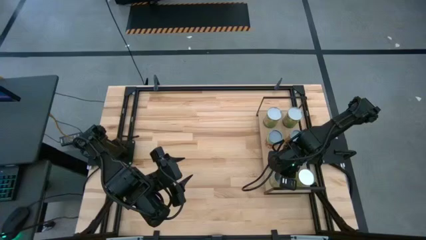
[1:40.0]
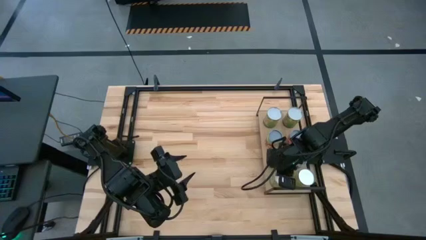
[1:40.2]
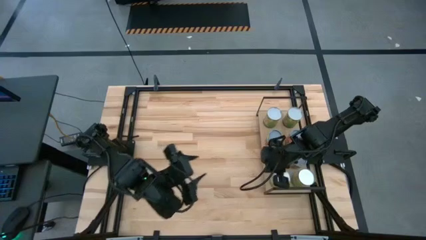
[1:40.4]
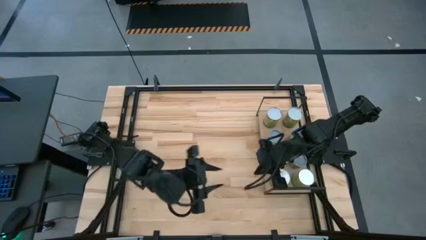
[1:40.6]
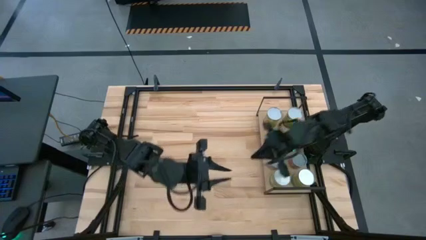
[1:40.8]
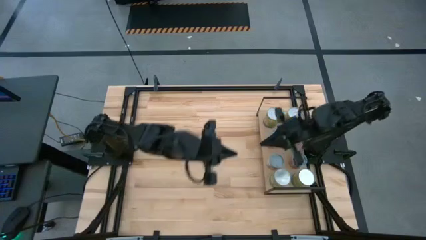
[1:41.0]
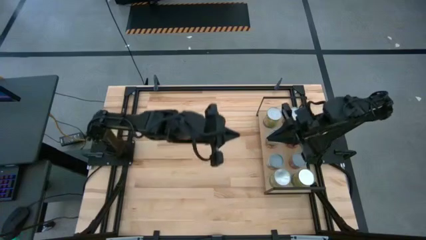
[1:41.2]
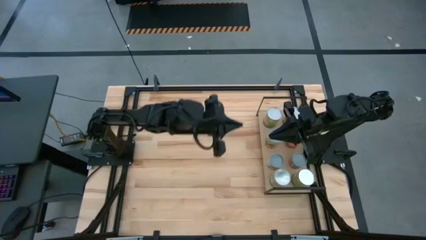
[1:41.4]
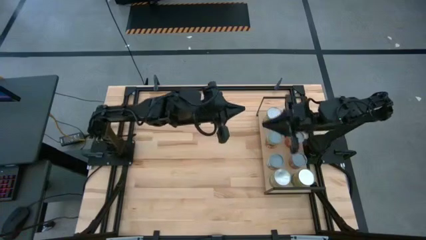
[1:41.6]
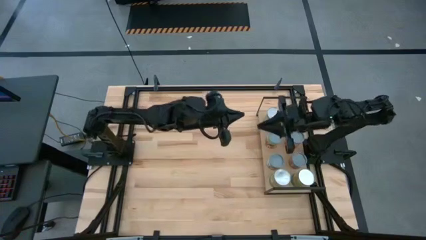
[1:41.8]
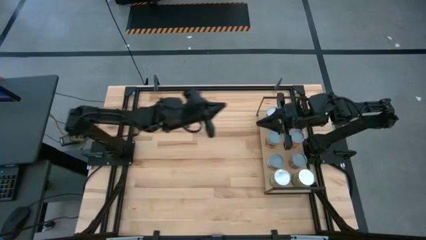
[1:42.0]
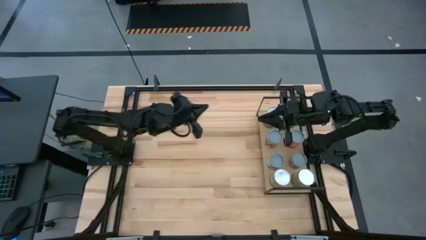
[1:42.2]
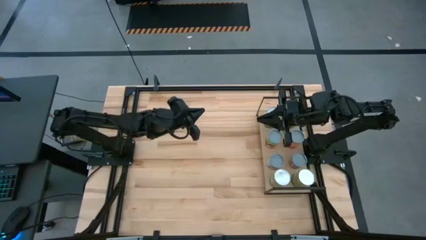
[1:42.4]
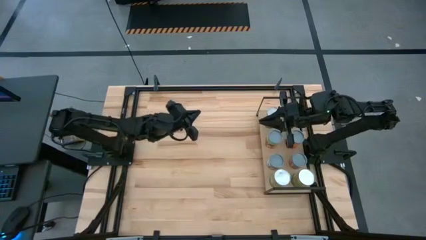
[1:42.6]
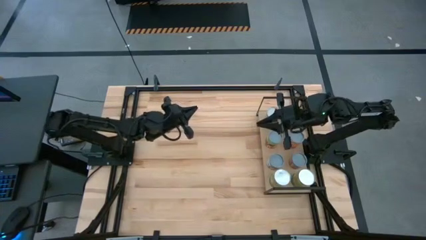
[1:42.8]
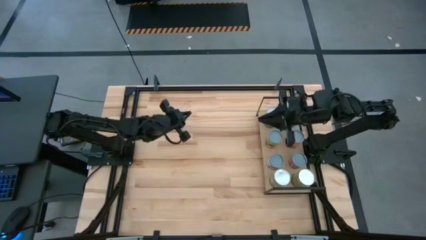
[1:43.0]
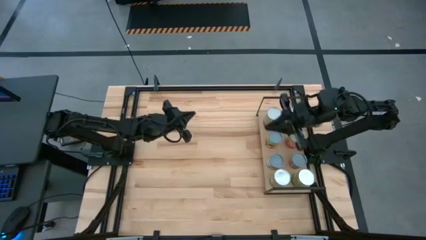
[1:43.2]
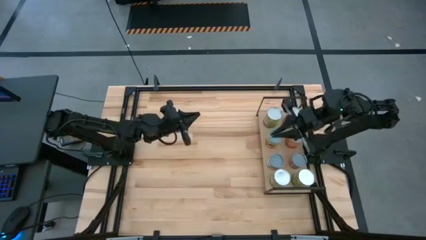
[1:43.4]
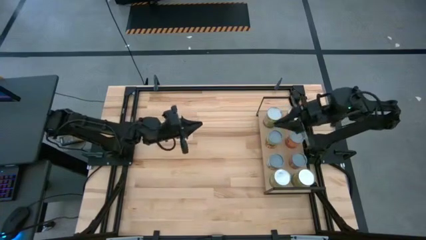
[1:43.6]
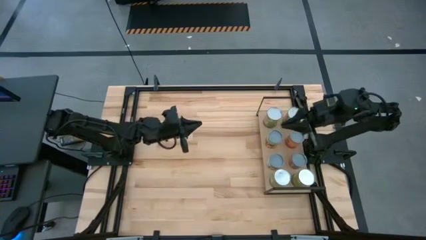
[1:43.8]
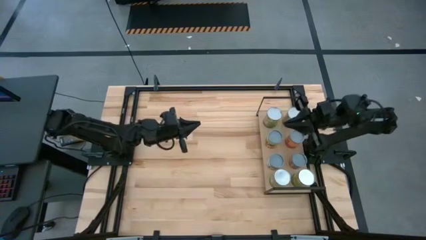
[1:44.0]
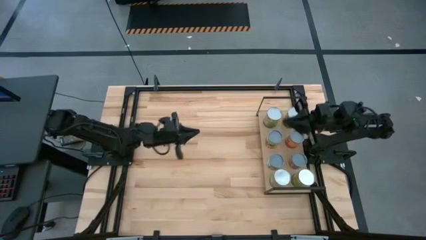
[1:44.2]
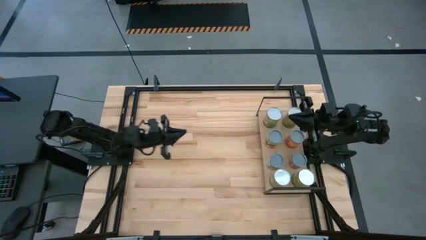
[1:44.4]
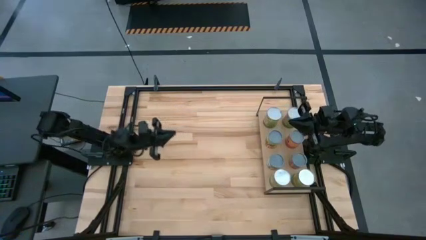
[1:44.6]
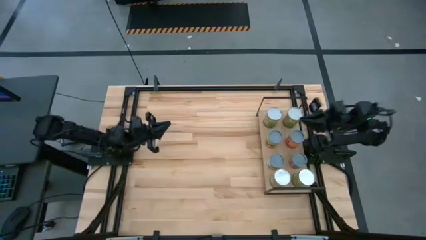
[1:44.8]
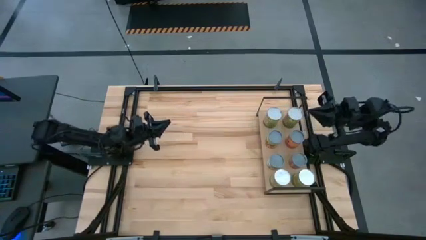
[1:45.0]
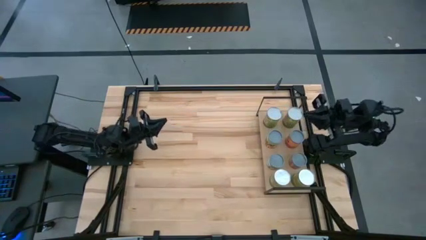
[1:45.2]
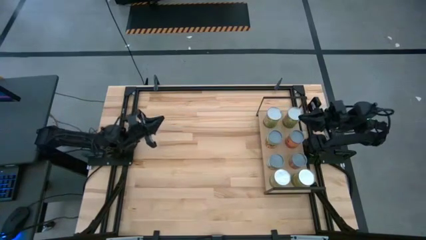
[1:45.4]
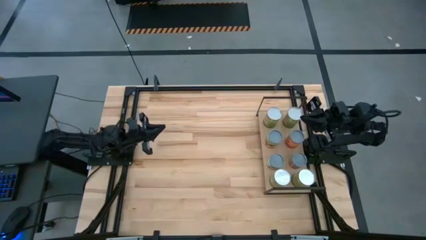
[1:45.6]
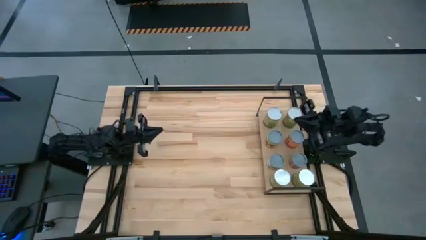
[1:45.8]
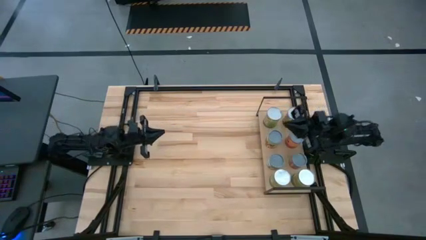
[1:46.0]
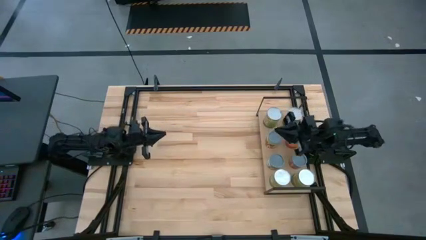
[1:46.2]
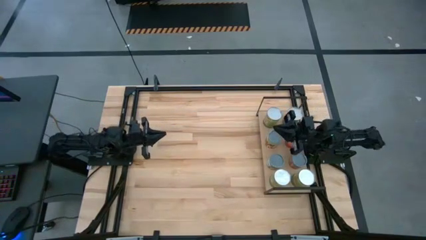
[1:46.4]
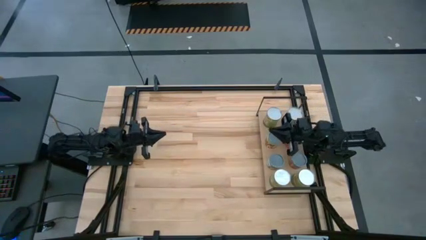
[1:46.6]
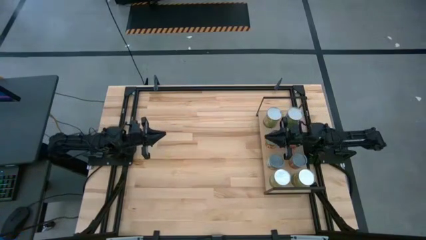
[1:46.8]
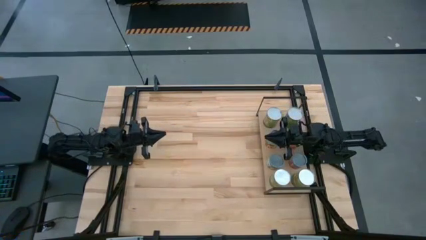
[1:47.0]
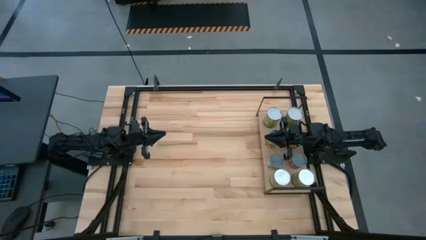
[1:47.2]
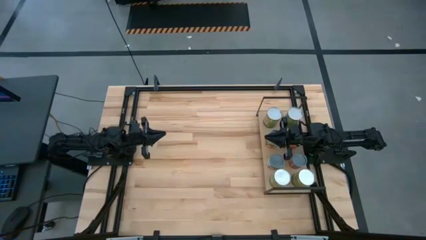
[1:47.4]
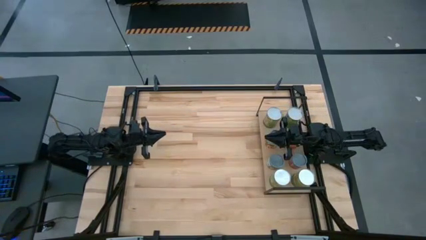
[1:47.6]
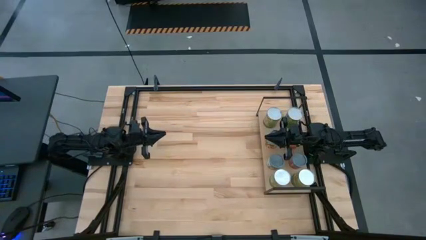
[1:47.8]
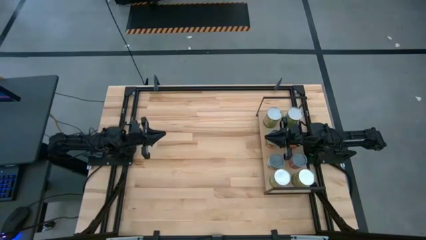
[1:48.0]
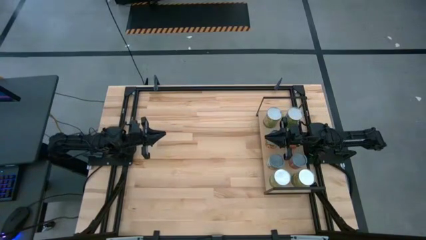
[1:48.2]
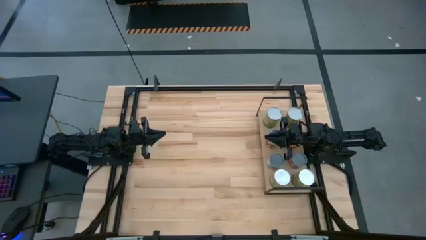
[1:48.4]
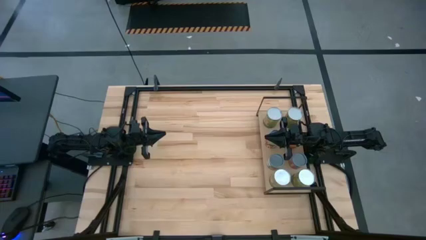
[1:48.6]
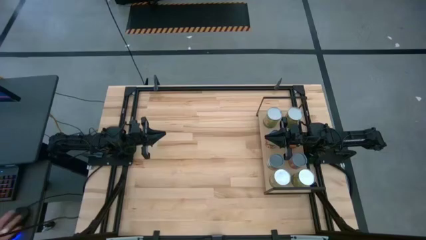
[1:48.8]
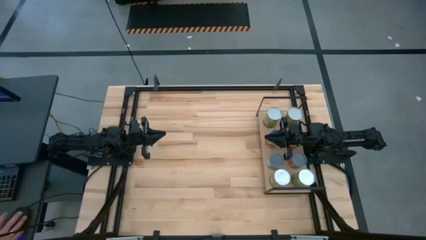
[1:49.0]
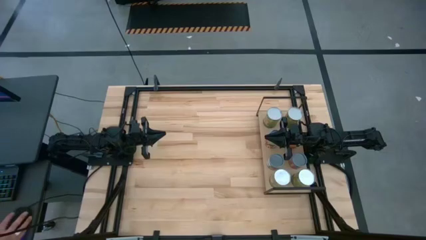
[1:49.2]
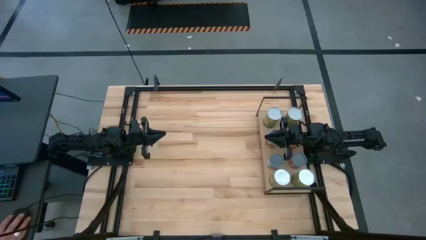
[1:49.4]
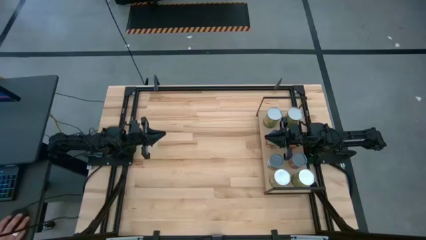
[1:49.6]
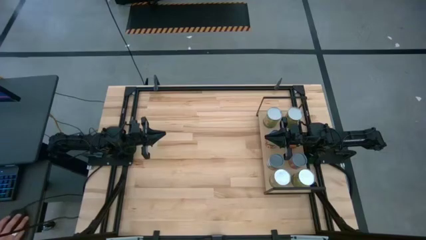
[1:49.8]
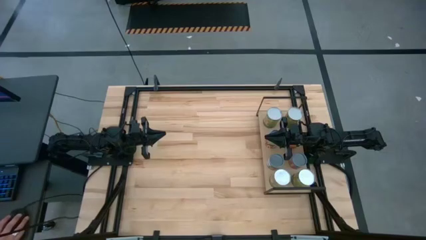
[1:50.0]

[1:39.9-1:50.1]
Task: Pick and place cans onto a shelf
Return to Home Position
